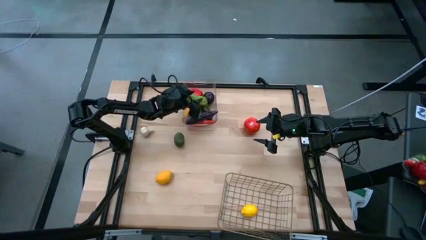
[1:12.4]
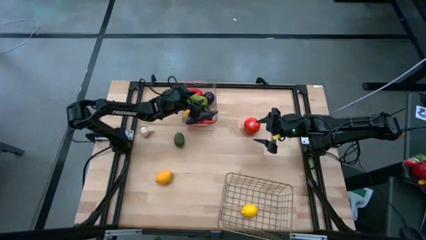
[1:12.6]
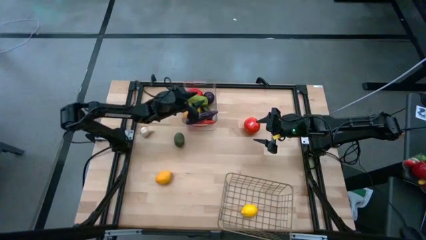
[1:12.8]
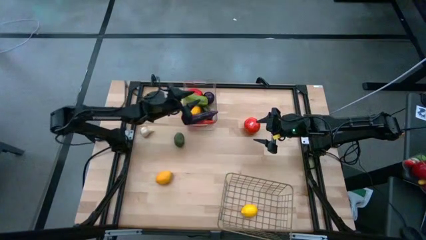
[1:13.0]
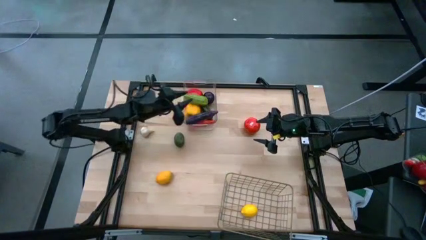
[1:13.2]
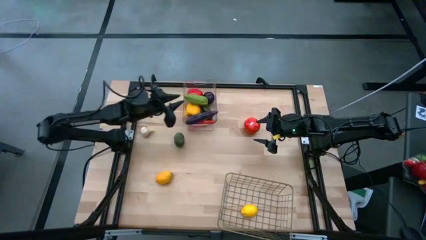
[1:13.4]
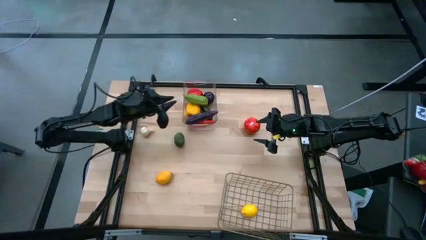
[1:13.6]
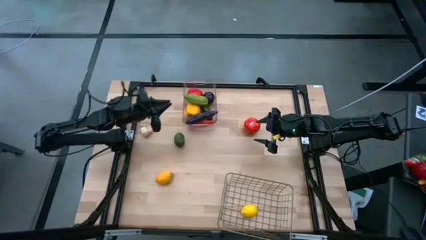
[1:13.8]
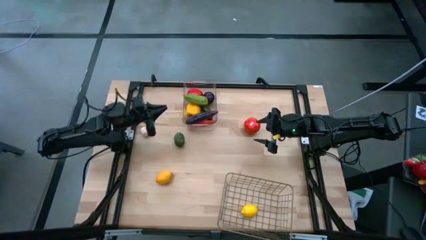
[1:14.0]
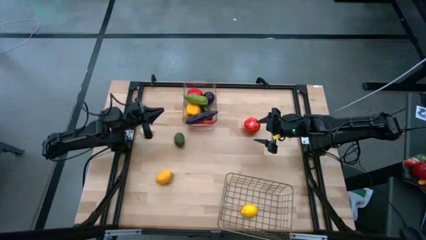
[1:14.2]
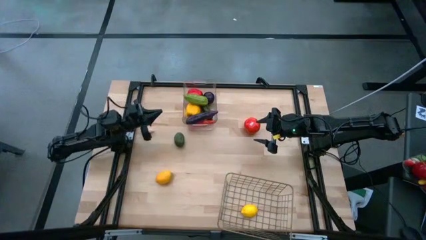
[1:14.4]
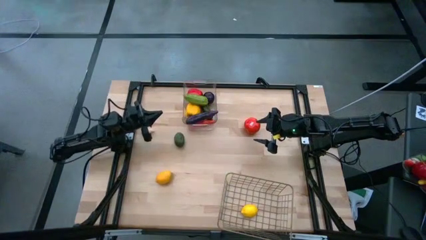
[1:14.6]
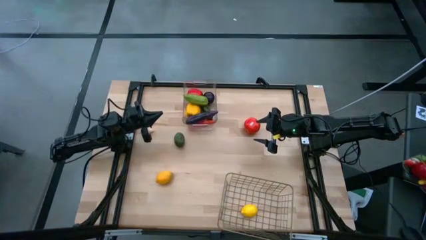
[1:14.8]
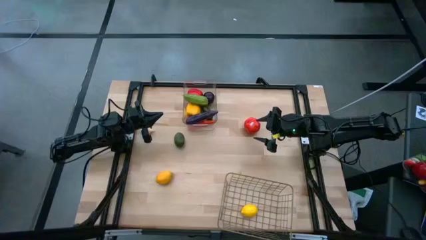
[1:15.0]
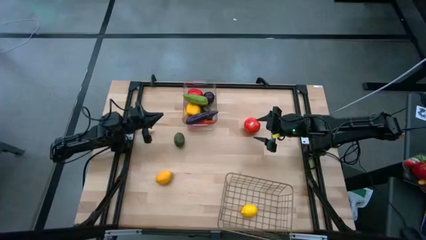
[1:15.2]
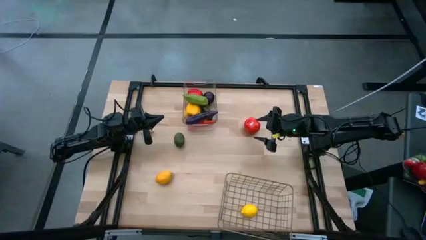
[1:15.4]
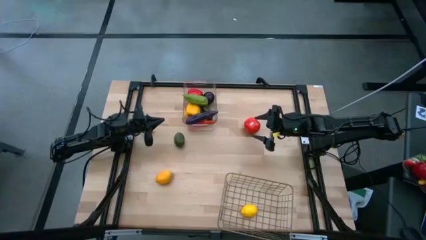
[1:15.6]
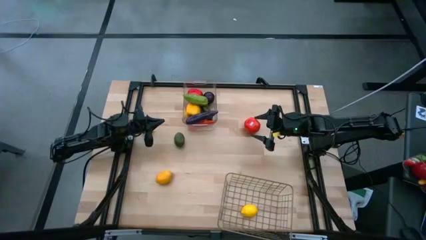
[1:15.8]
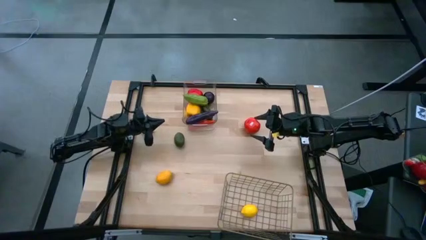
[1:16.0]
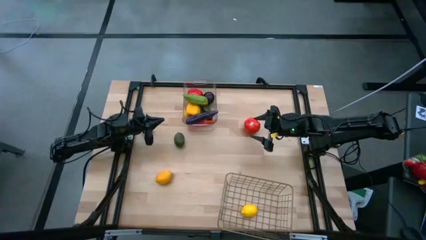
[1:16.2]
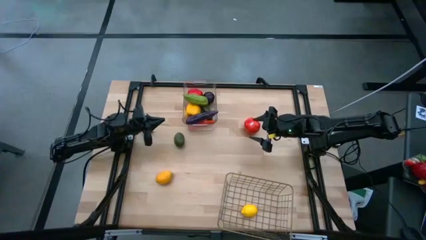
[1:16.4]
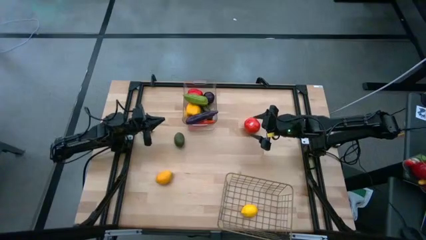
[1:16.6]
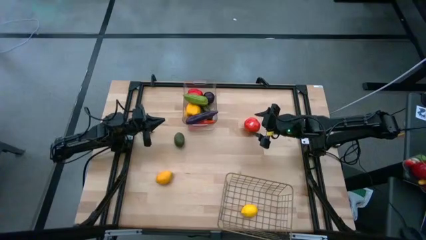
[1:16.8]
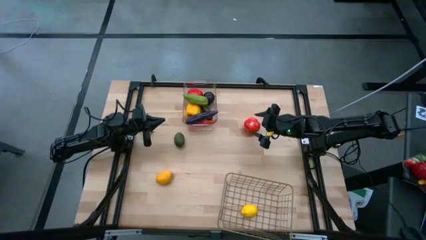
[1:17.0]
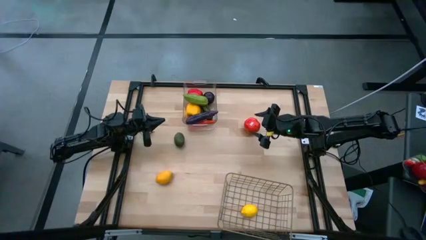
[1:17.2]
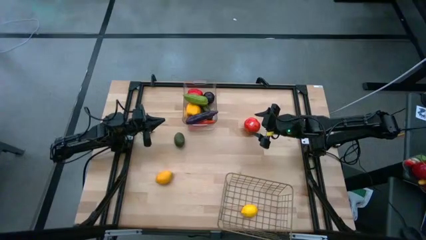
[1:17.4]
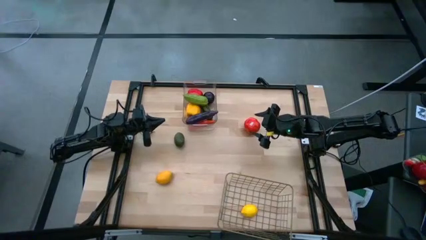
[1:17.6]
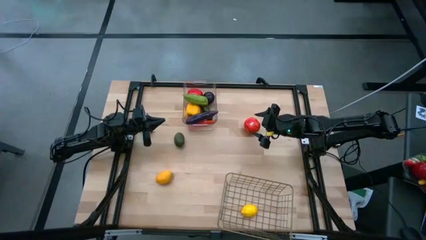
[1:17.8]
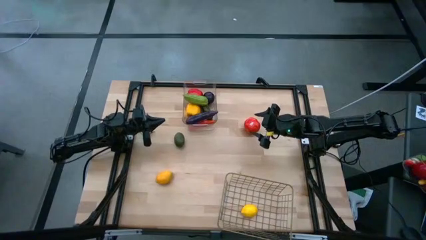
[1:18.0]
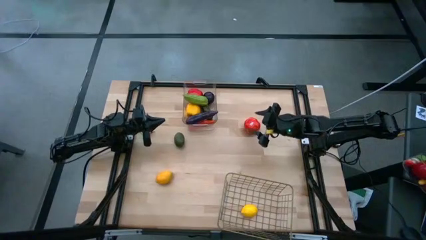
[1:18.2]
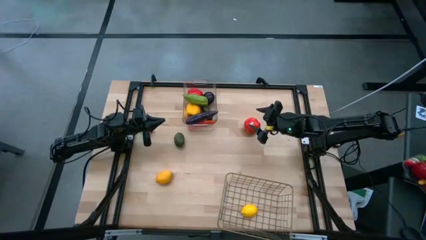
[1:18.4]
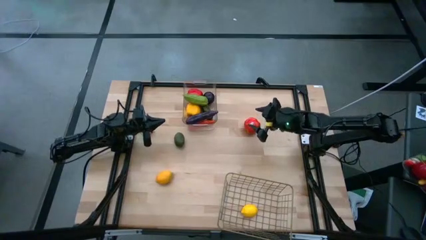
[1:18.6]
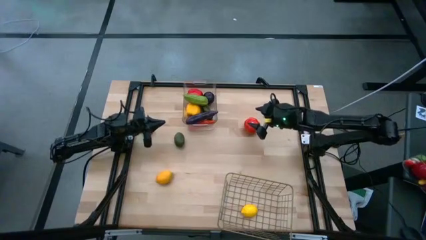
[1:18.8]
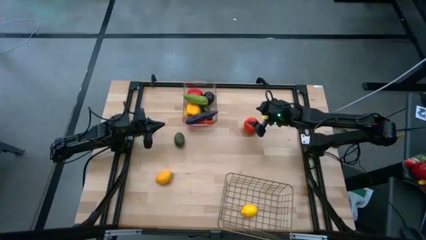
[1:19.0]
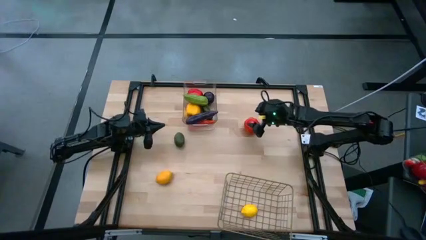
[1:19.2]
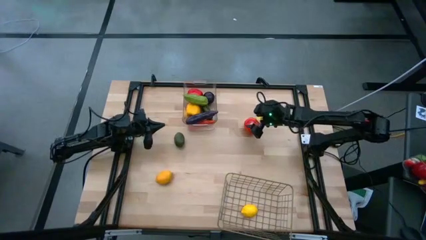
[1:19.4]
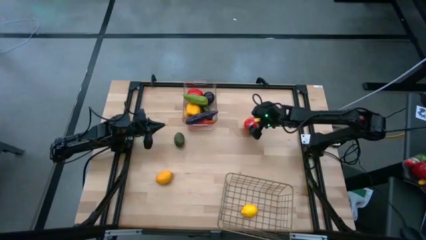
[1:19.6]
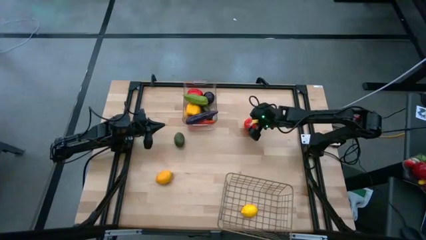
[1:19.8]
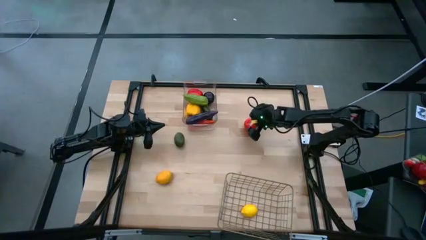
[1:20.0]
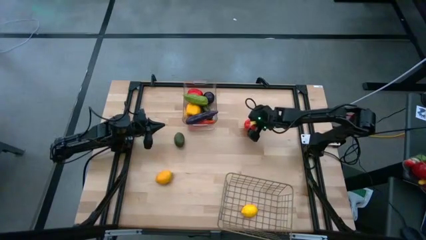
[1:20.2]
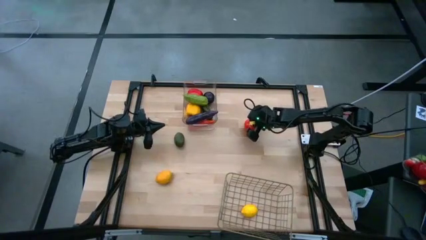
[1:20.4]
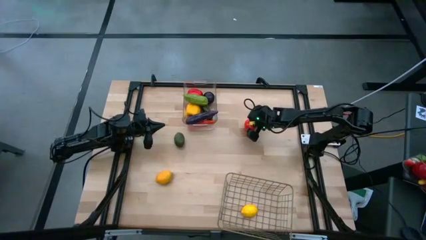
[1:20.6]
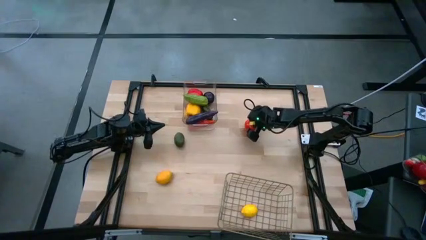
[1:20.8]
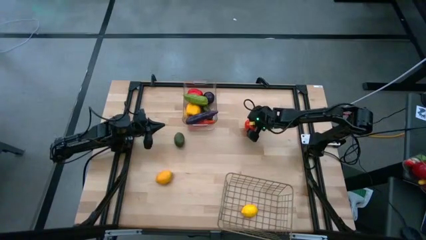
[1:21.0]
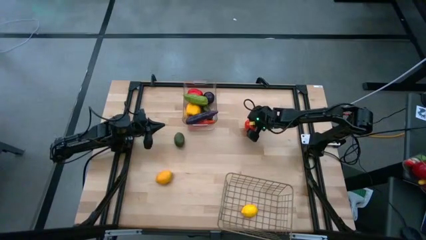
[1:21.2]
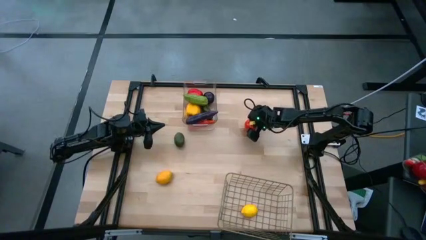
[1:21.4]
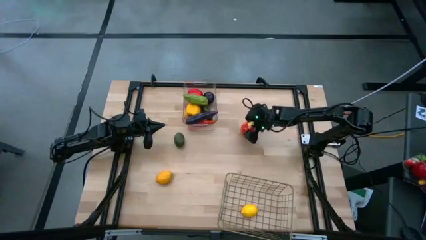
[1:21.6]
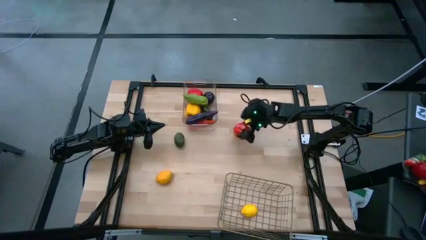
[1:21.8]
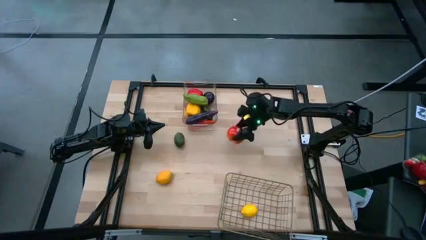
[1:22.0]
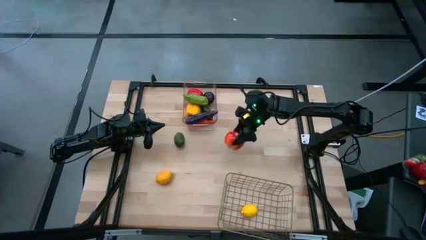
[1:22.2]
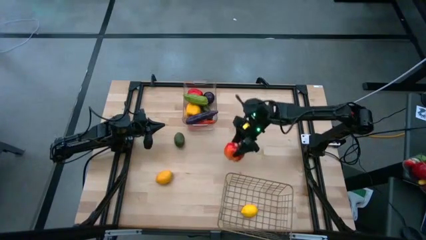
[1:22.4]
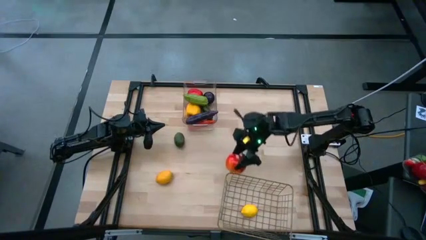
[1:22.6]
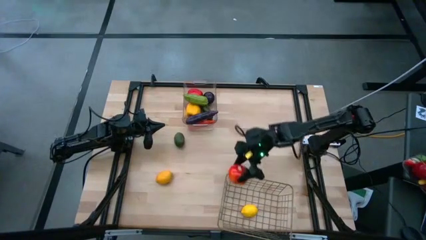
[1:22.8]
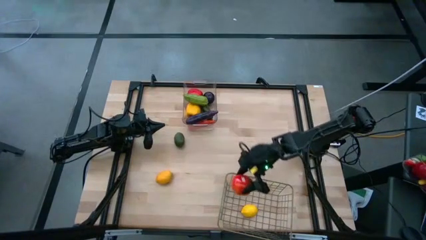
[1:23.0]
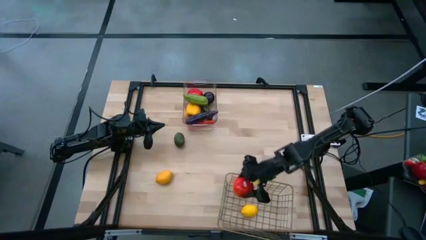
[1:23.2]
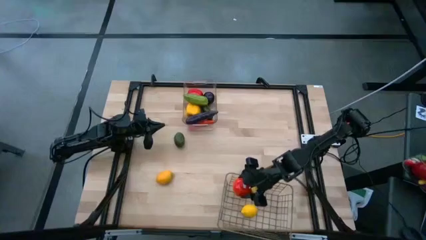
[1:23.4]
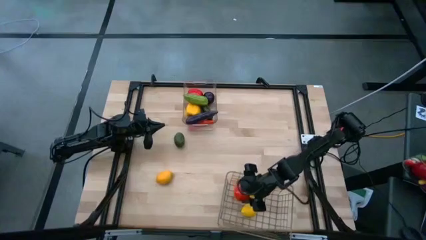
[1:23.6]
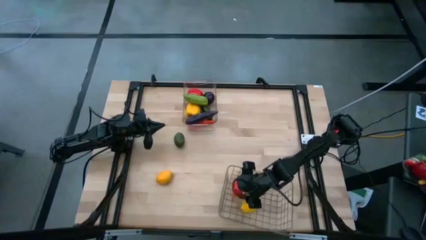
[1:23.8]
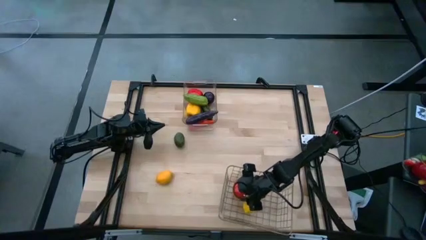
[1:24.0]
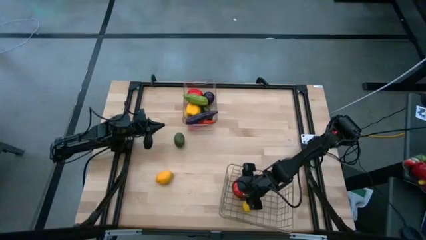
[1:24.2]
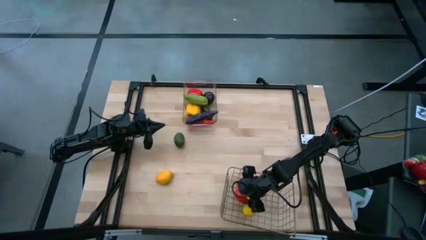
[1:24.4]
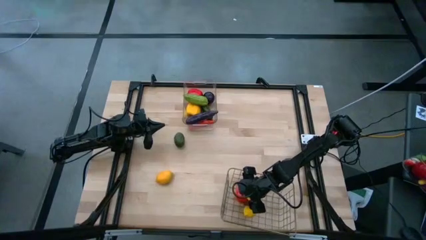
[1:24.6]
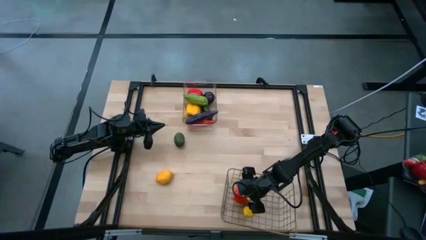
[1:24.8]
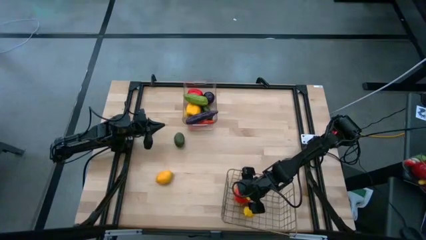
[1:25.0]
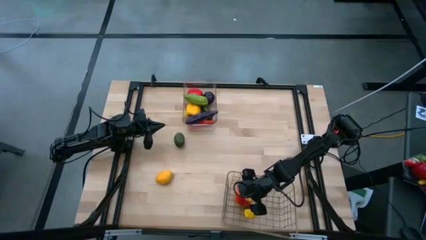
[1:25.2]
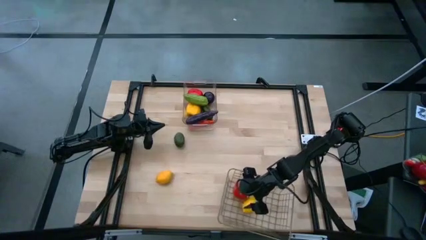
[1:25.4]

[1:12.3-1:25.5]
Task: Sort produce into baskets
Put the red tomato into the gold wire basket

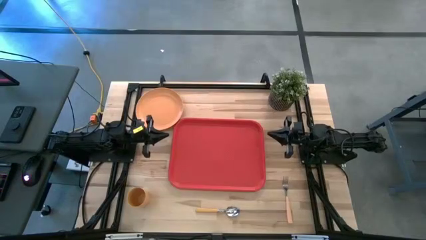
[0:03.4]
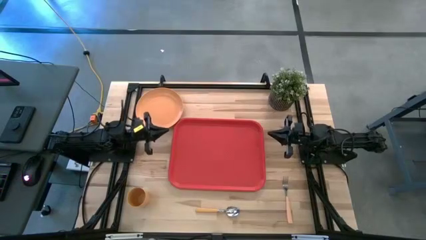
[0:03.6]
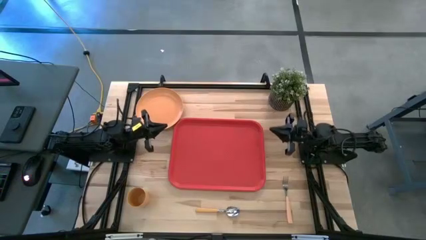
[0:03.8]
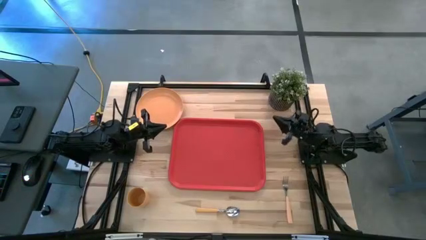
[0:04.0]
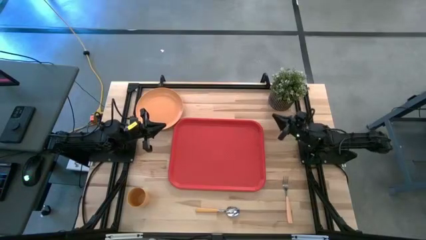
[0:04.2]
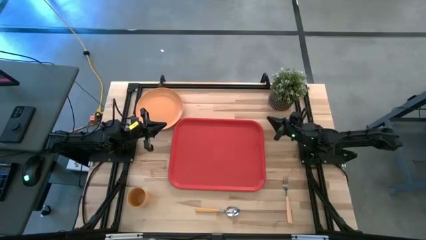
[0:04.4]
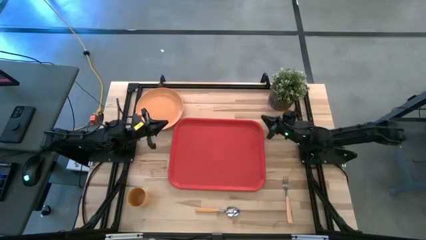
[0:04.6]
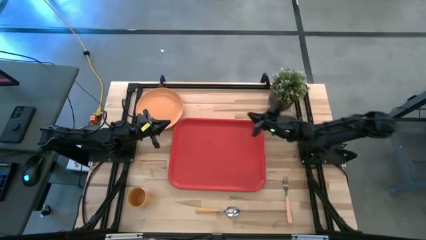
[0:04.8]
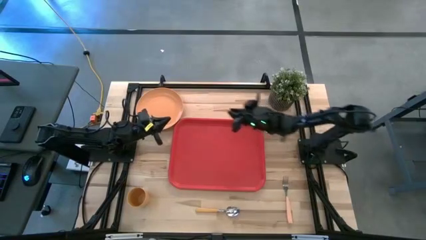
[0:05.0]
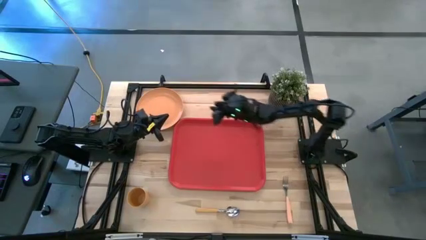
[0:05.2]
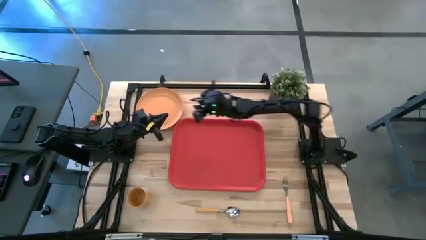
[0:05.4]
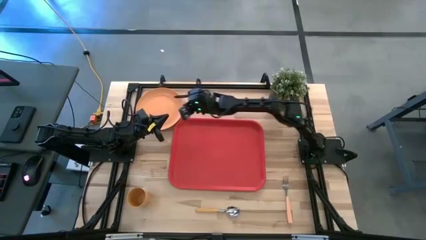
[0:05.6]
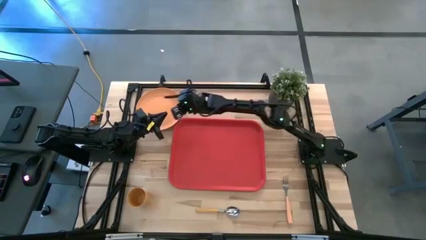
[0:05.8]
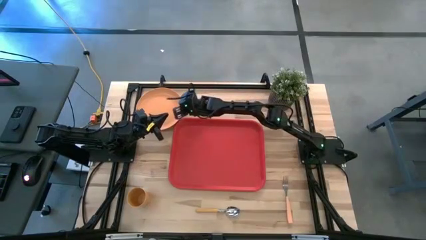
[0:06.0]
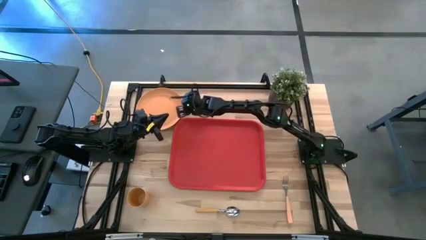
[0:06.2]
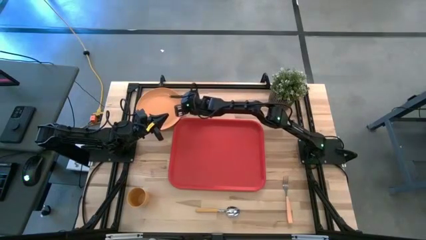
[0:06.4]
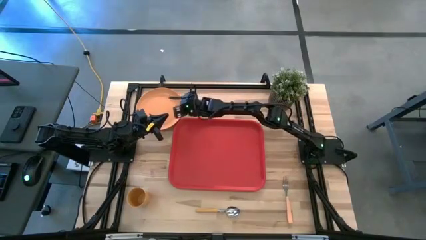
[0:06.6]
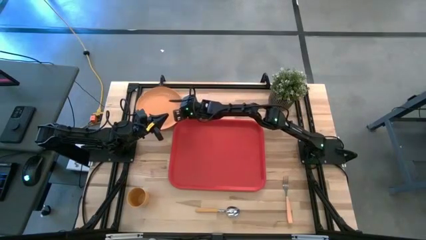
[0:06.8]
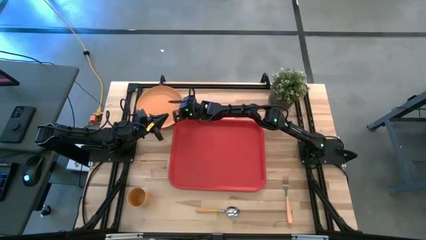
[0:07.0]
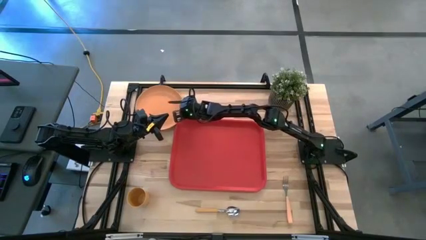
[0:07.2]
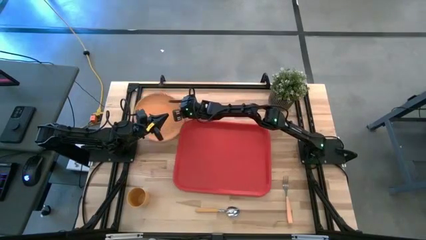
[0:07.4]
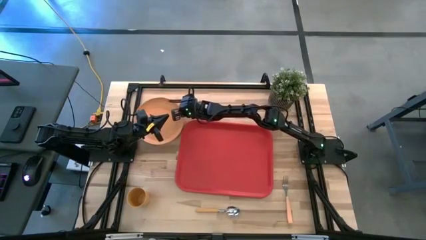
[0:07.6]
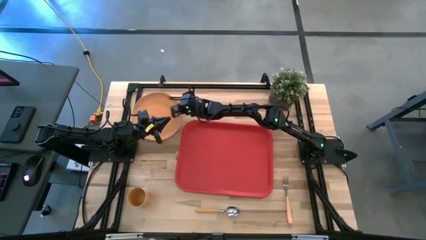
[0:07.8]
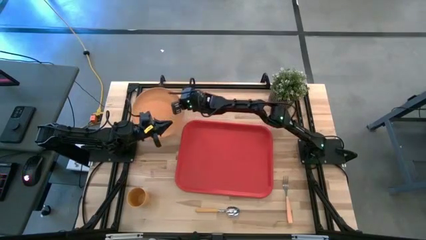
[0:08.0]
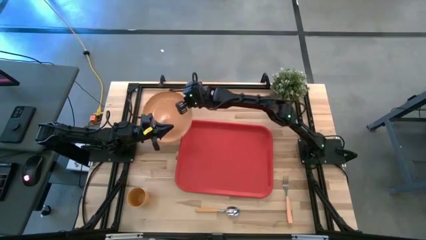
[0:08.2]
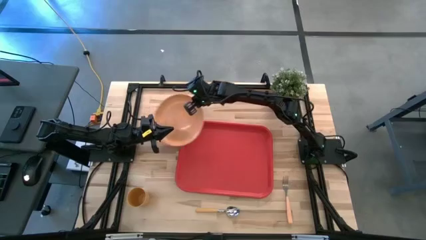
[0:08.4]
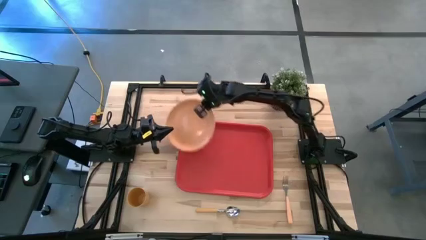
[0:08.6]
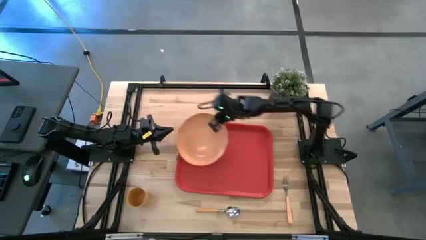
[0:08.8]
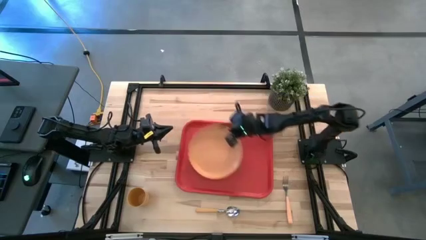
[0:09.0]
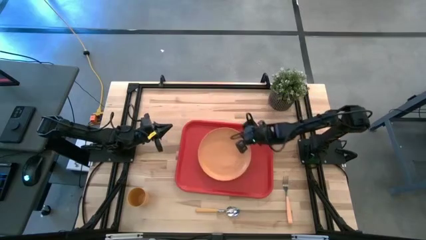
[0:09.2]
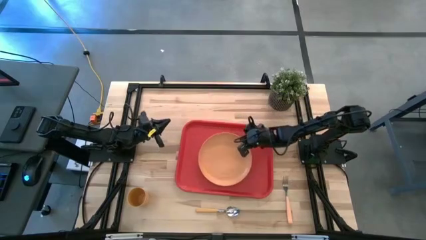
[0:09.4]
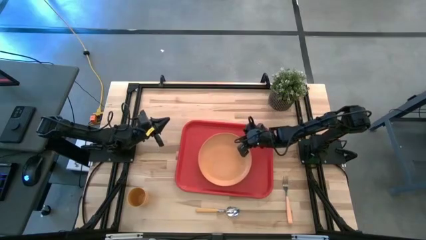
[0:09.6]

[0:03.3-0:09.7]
Task: Pick and place plate/cup/fork/spoon on tray
Put the orange plate on the center of the red serving tray
